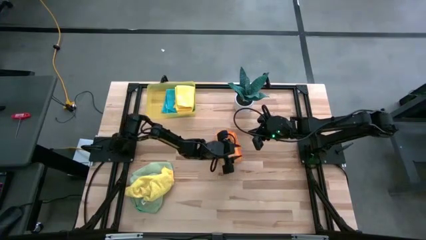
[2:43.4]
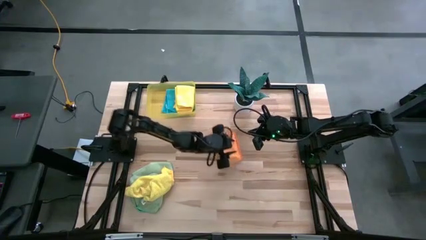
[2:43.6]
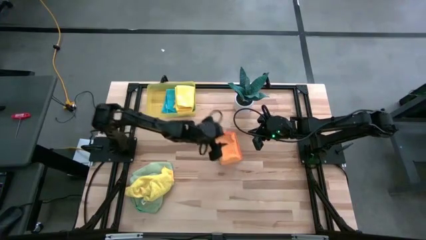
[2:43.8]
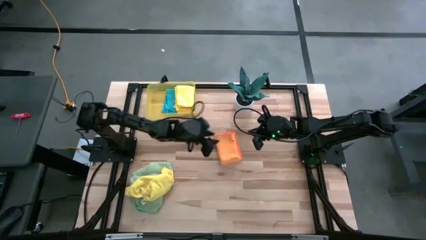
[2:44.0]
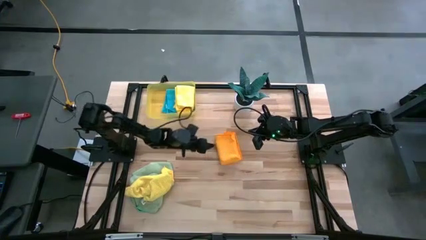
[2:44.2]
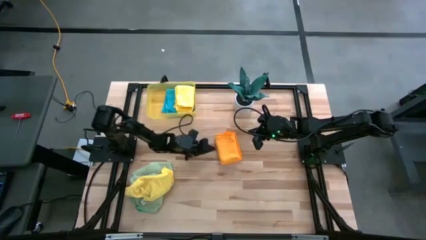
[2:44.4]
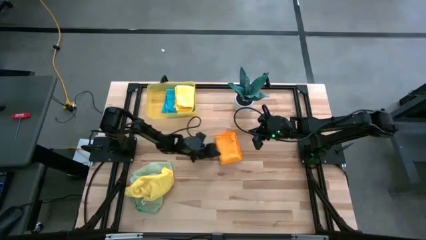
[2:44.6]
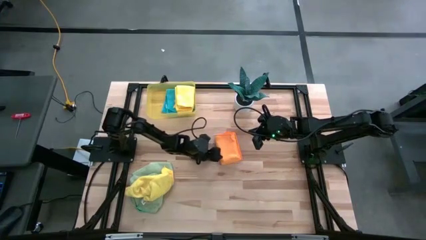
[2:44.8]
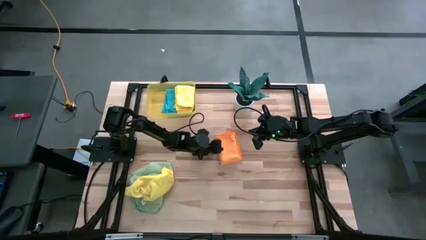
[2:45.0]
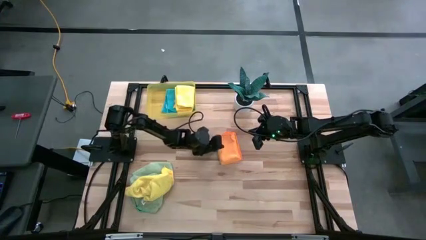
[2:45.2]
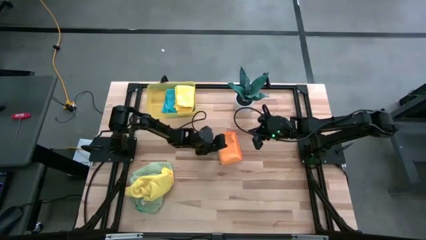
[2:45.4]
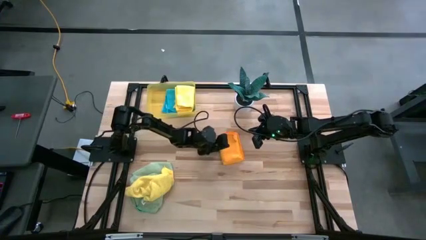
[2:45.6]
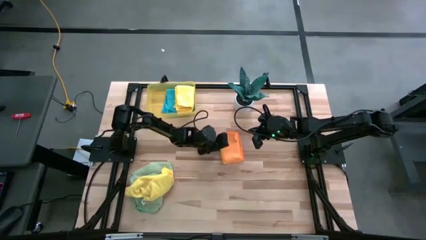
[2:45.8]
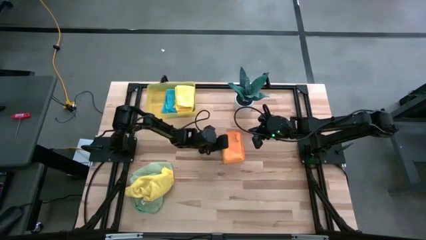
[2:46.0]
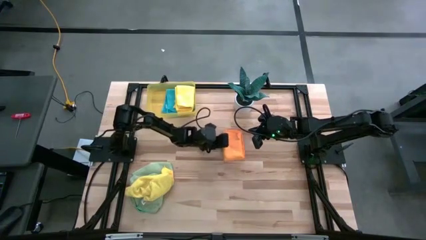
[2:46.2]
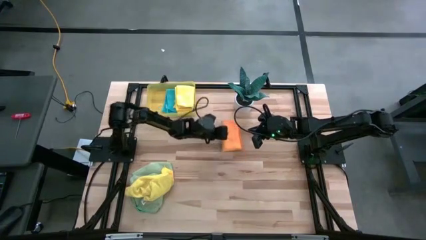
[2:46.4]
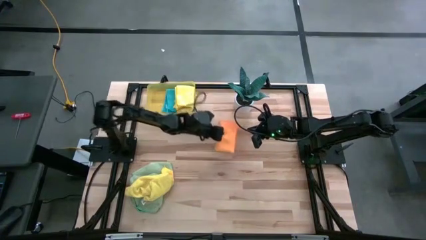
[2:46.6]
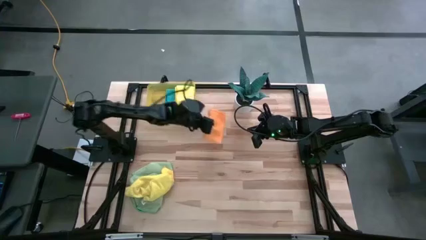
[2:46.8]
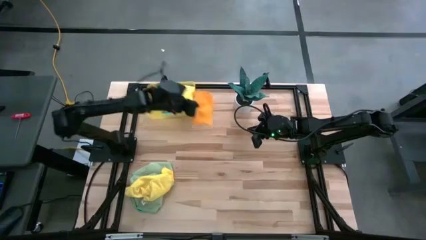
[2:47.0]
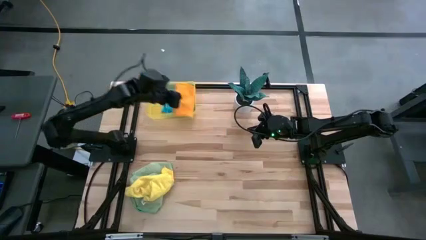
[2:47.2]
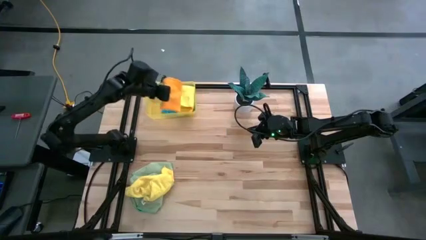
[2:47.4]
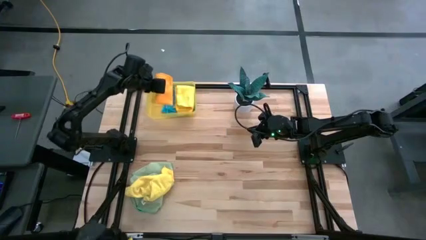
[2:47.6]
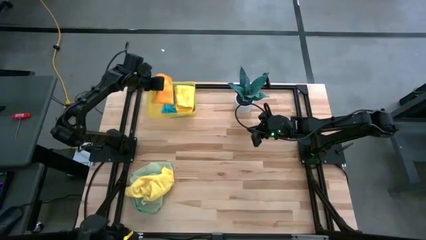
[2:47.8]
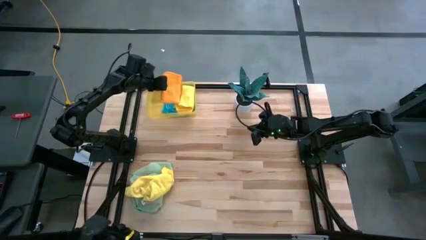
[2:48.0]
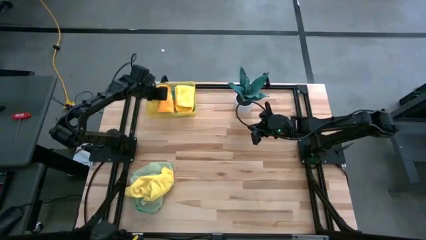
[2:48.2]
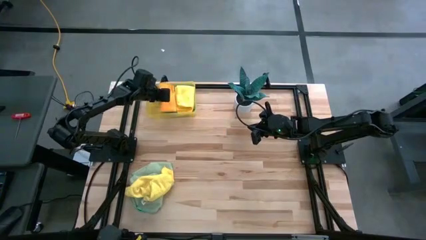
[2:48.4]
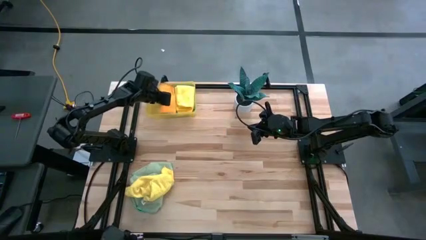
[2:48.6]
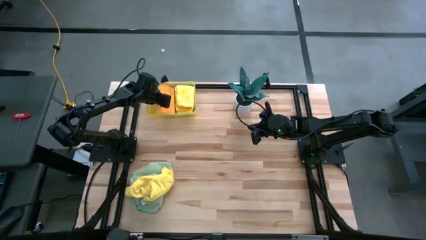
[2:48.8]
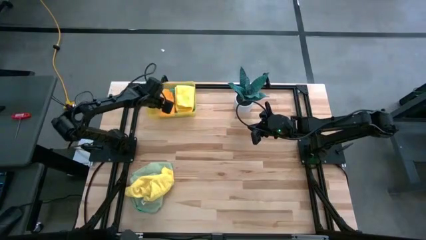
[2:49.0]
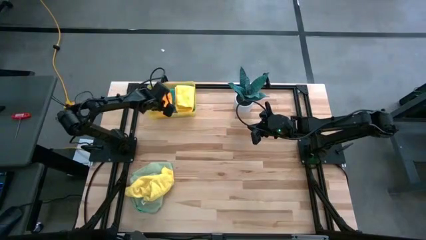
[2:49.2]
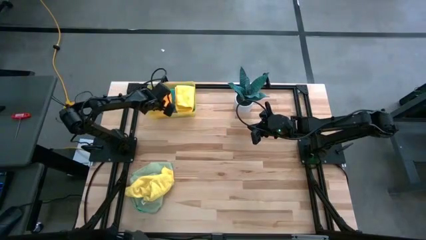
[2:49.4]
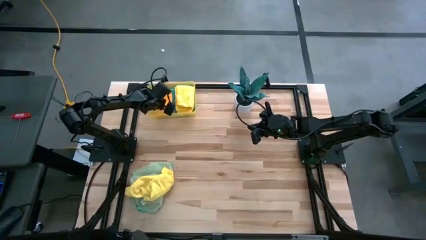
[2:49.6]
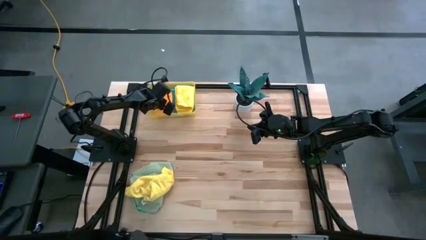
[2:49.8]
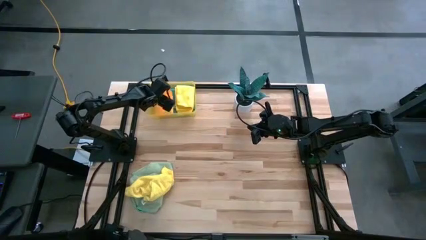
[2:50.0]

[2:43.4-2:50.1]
Task: Fold microfiber towels
Put the folded orange microfiber cloth into the bin

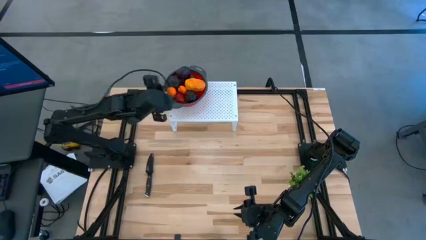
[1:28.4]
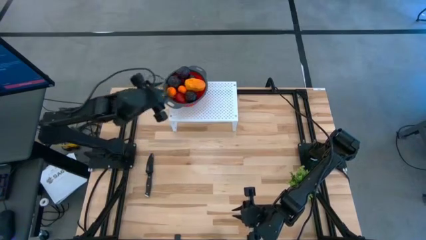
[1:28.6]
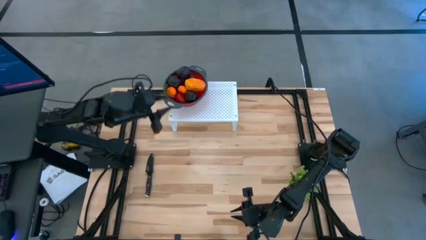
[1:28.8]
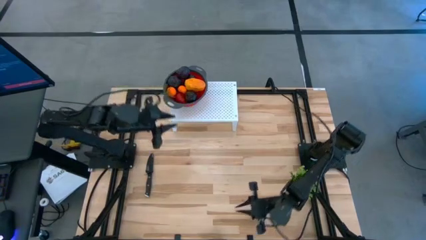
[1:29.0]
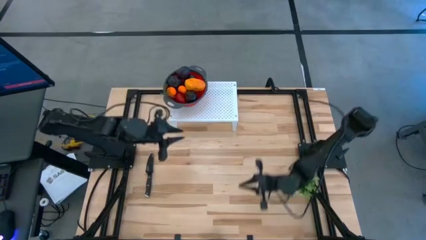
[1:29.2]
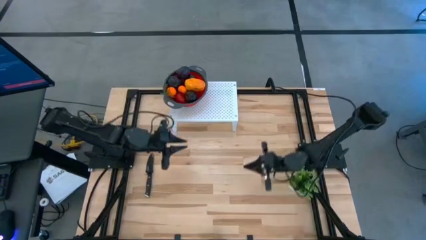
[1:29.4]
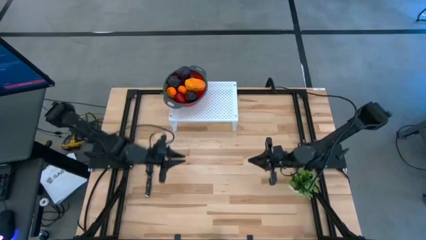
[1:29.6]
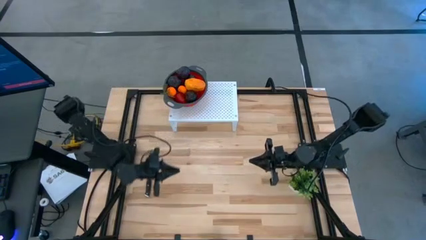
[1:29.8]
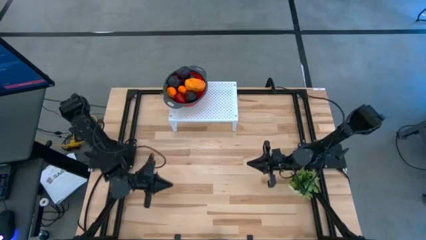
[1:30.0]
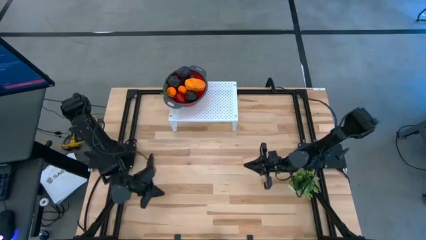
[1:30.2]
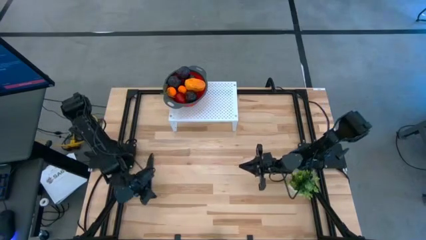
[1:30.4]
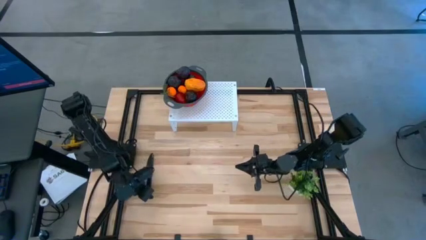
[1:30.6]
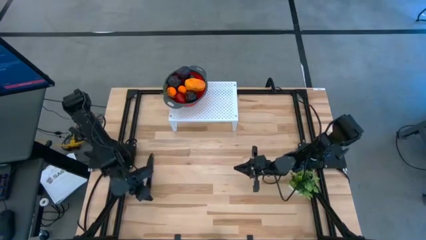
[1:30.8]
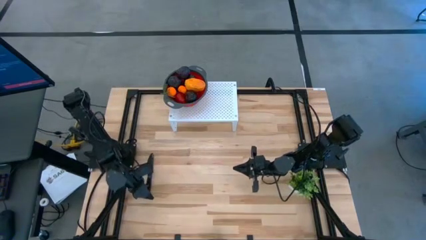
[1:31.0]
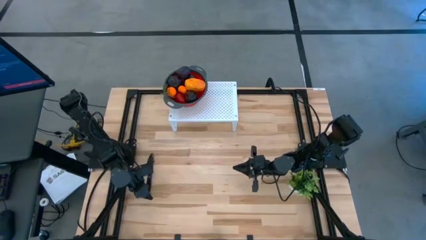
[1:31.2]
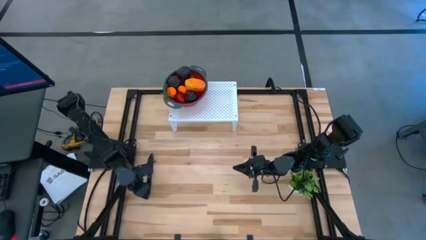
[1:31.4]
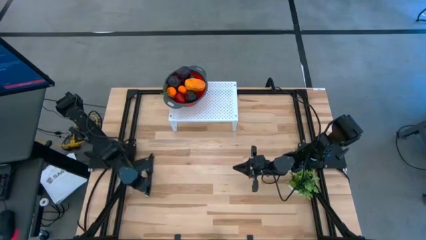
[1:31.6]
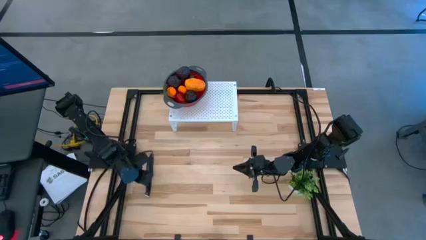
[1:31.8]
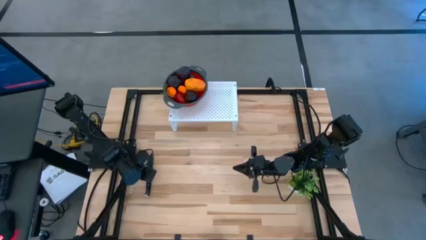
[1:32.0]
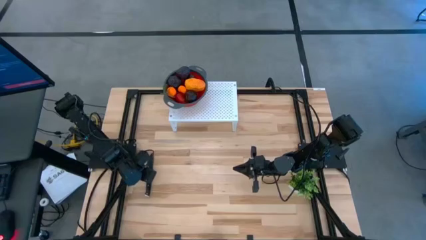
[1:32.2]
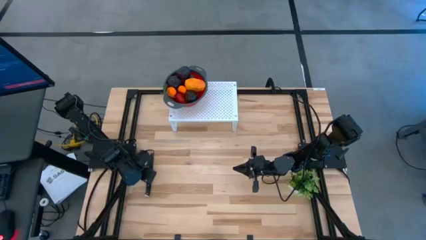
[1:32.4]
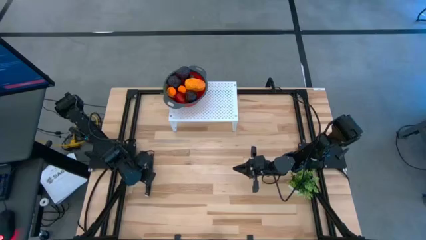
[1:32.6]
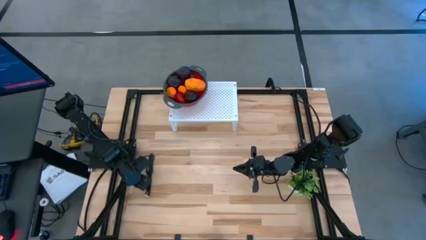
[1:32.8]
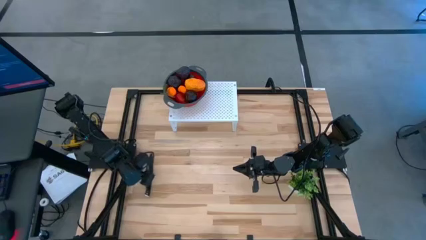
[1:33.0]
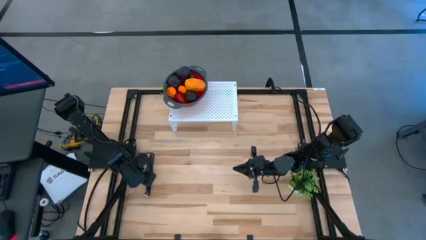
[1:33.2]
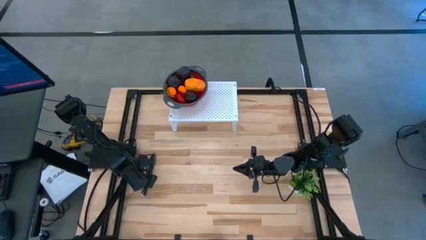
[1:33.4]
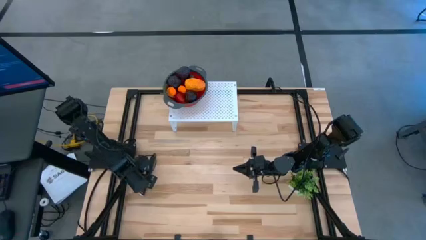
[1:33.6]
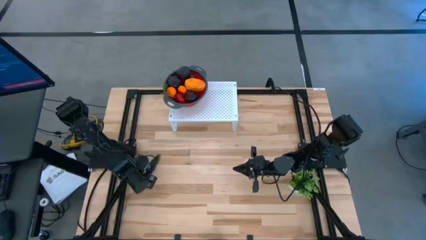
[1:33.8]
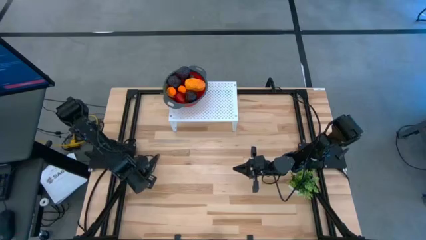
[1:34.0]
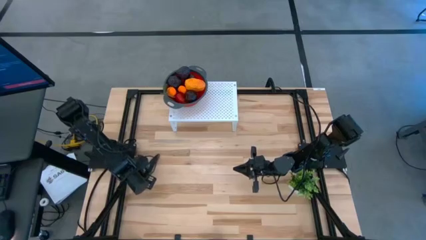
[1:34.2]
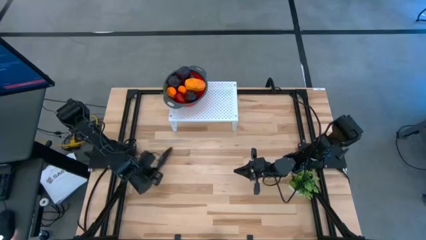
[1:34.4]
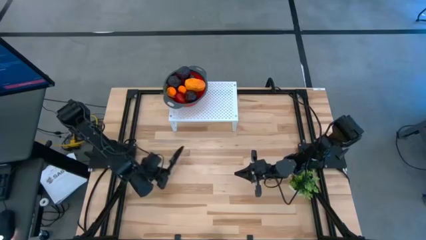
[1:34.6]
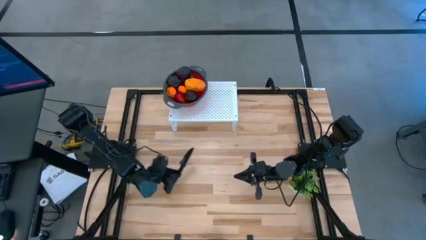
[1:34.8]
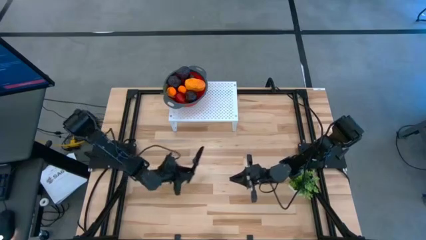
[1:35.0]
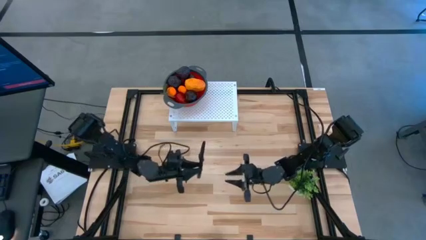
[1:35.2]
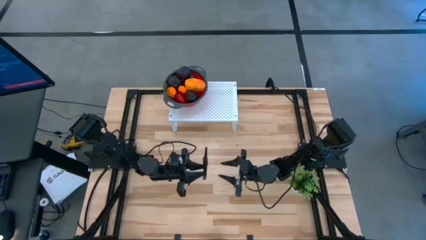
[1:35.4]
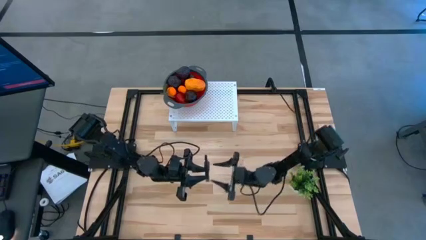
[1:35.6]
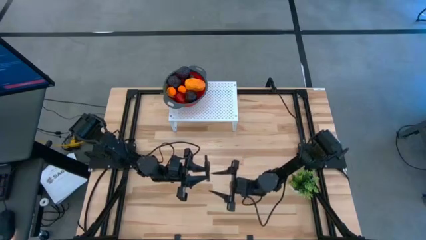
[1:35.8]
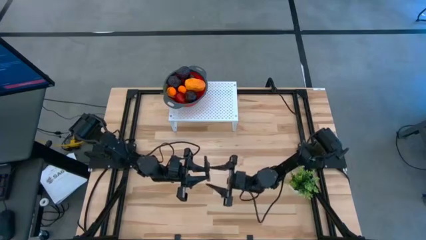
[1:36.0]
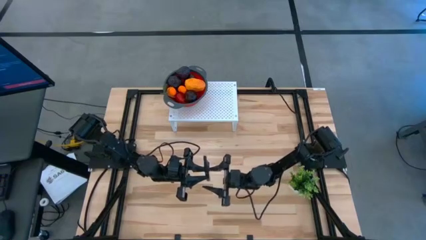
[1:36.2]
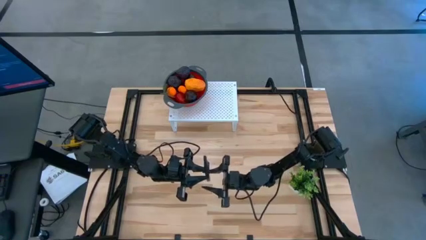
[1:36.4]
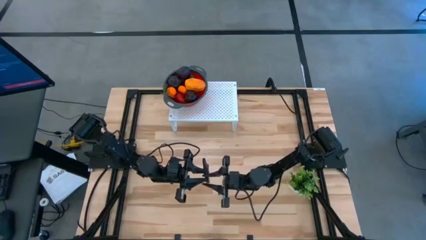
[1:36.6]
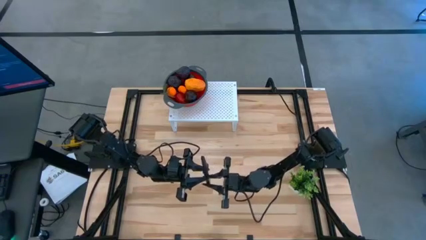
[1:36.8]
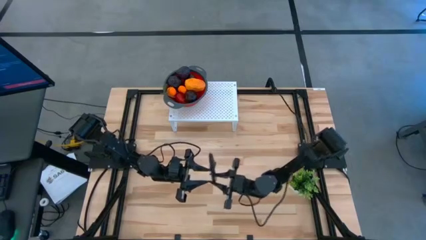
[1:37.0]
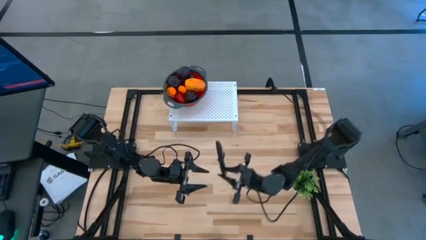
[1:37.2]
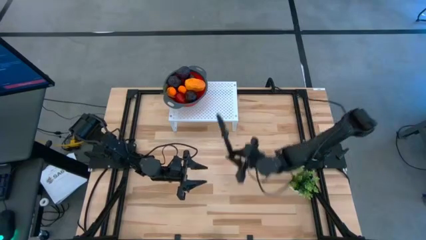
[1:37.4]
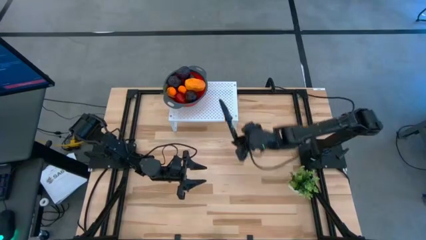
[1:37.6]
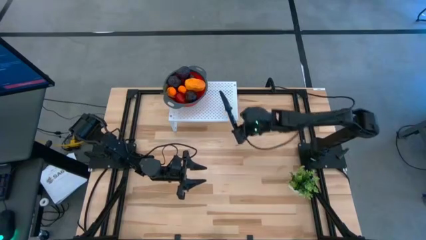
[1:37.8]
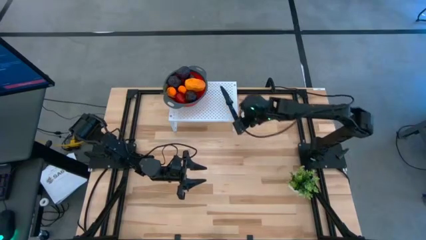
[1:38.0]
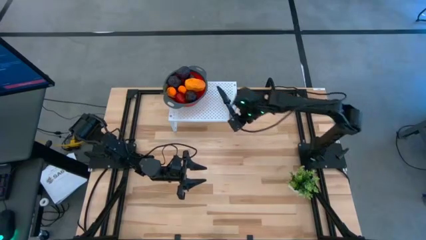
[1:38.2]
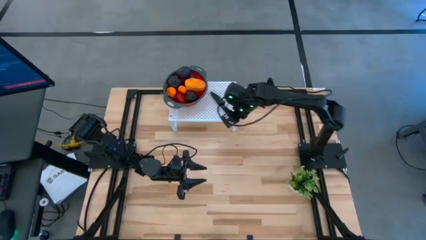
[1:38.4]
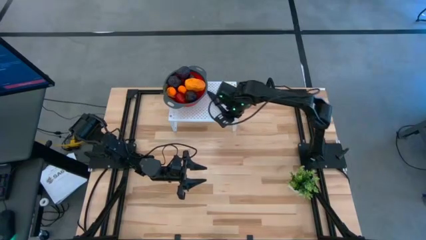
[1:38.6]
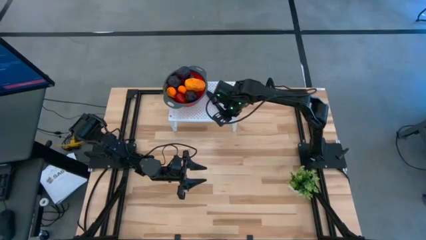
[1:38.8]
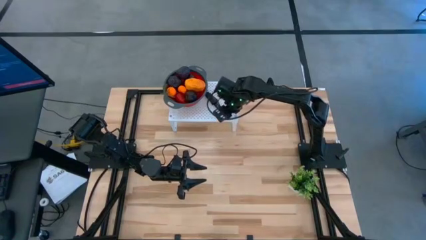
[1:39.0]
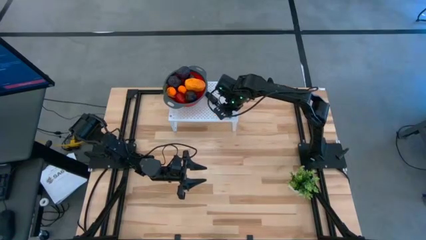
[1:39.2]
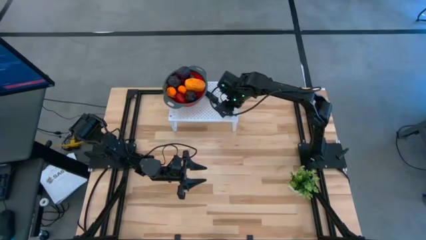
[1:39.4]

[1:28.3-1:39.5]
Task: Pick & Place Fruit
Put the black knife on the shelf to the right of the red strainer bowl
